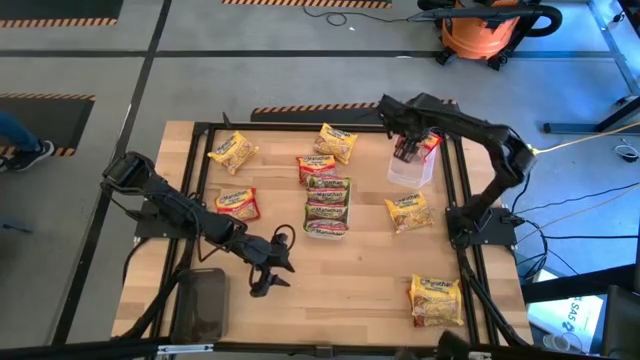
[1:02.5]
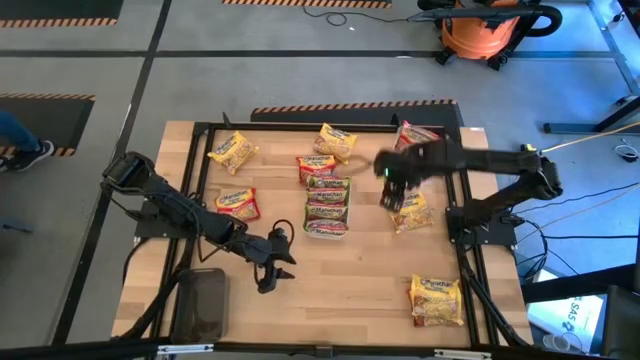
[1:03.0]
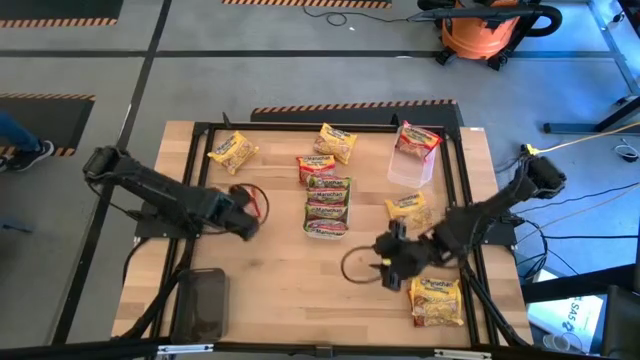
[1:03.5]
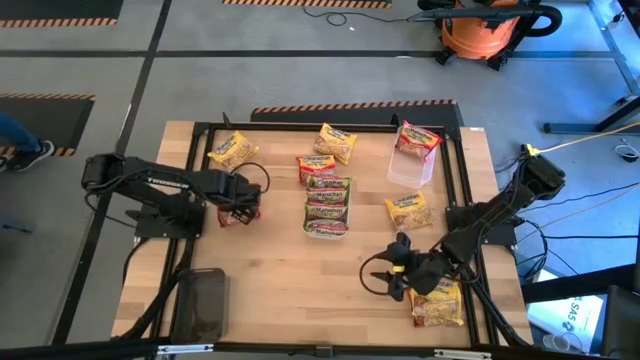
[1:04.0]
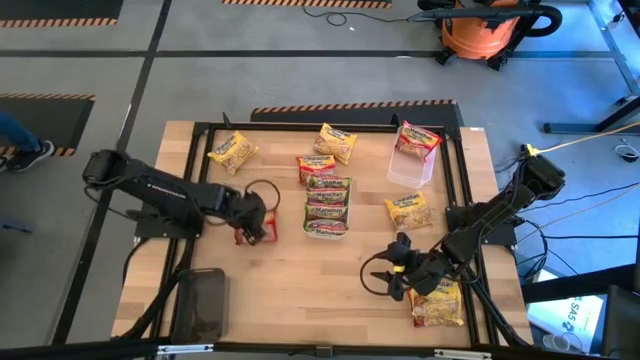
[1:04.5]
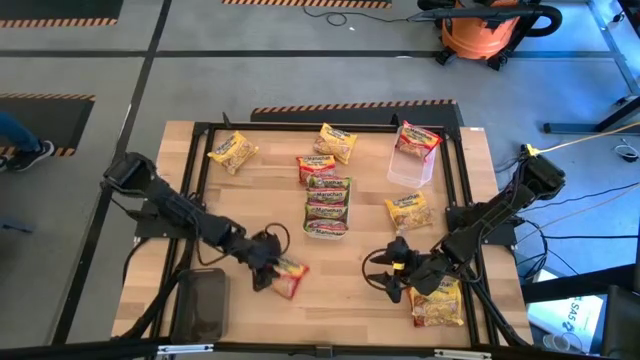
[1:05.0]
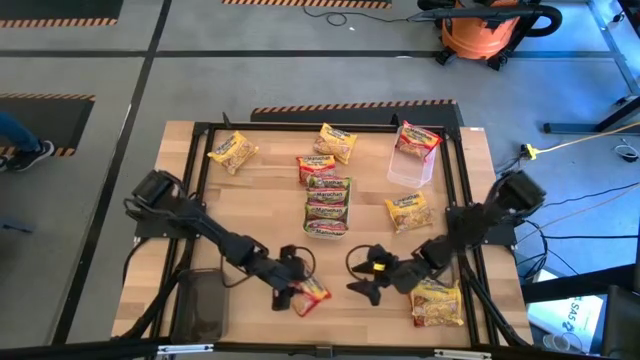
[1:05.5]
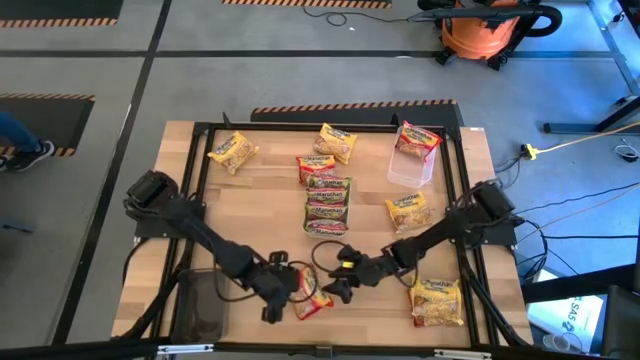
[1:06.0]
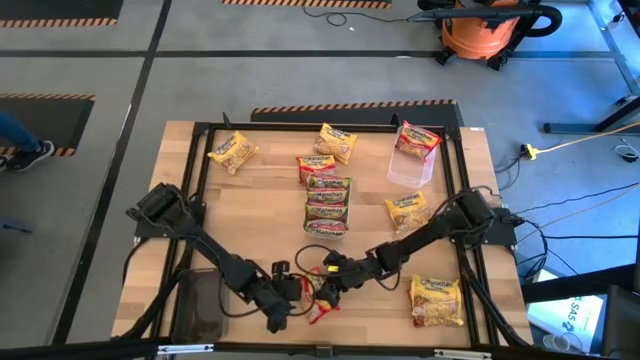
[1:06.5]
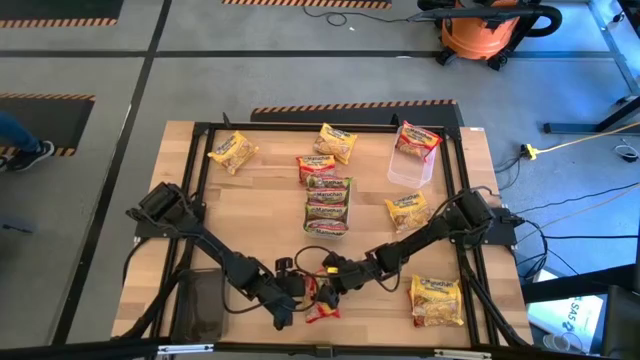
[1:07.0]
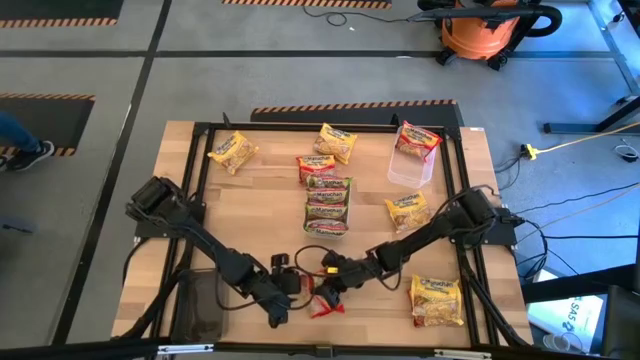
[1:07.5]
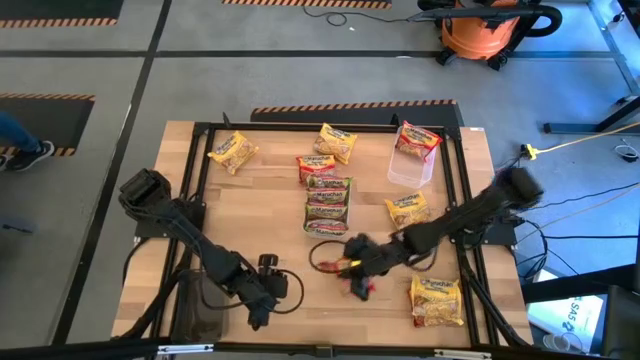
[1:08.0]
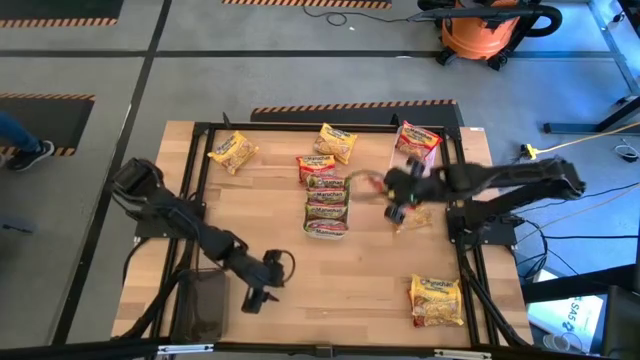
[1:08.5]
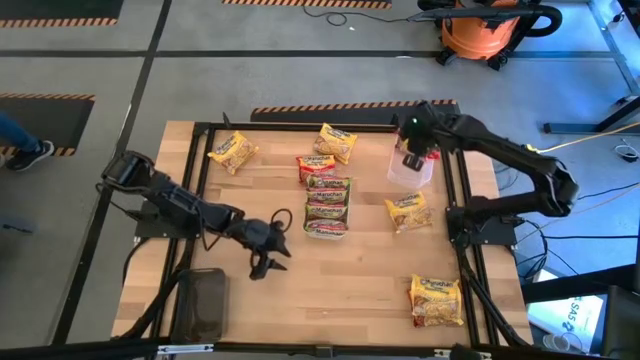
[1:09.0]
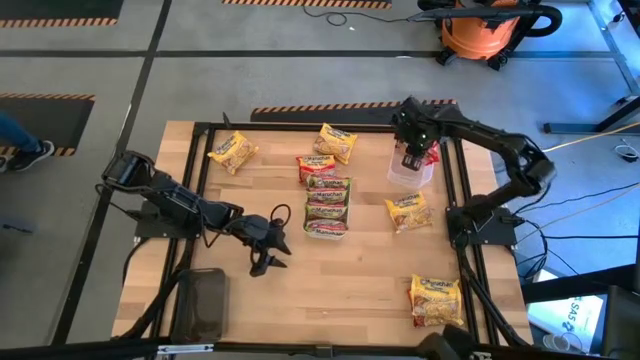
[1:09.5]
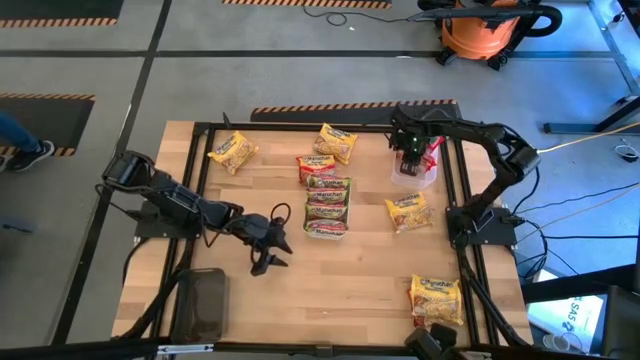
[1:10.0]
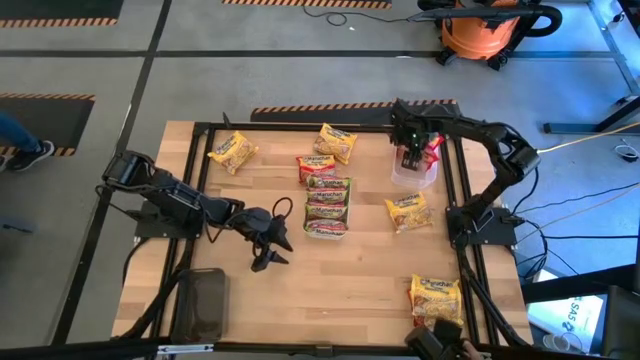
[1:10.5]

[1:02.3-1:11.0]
Task: Sort Maruchan noodles
Put the red noodle pack into the transparent bin

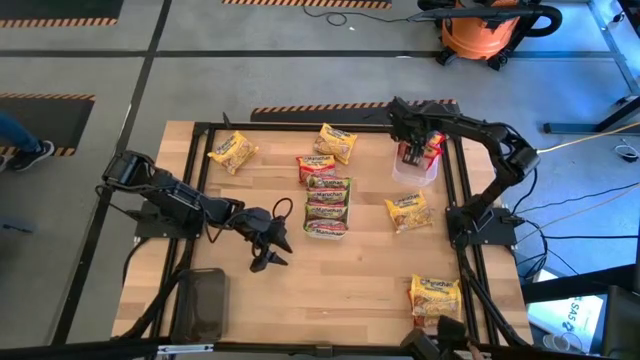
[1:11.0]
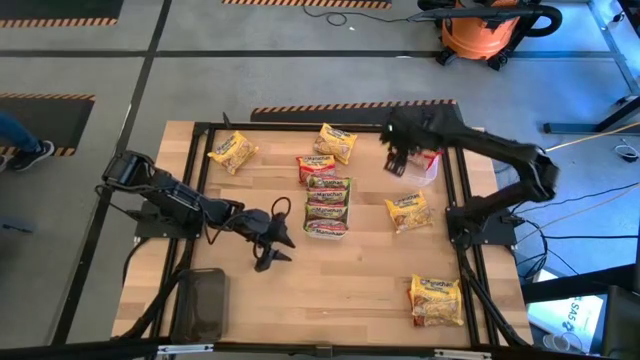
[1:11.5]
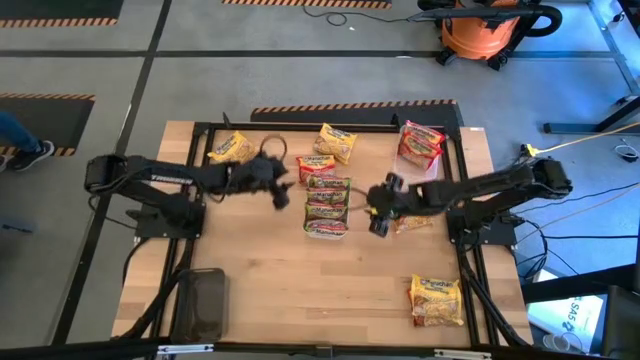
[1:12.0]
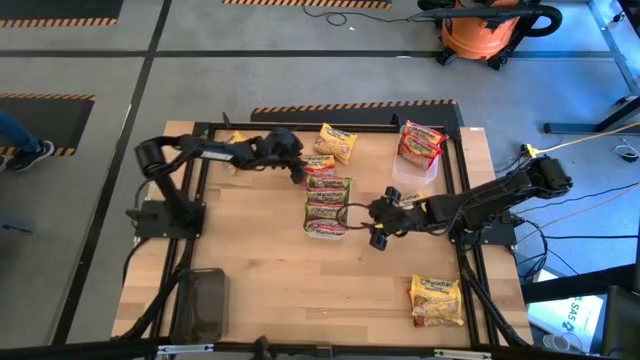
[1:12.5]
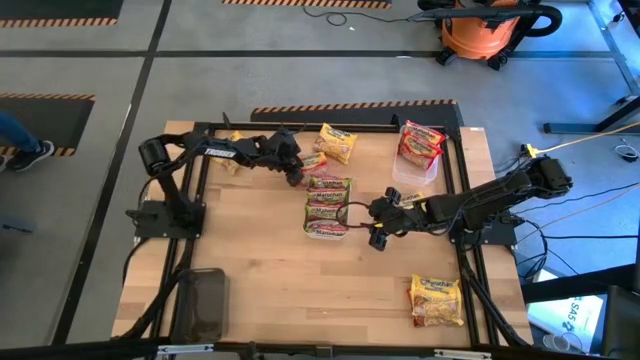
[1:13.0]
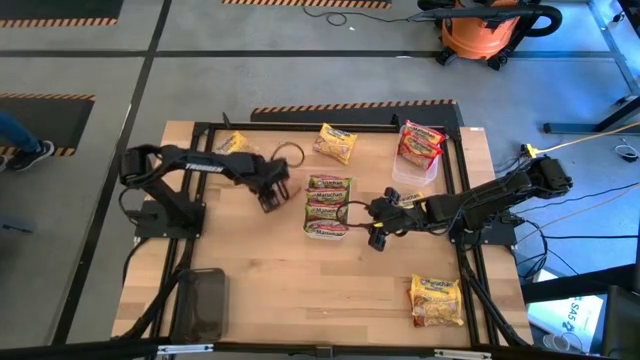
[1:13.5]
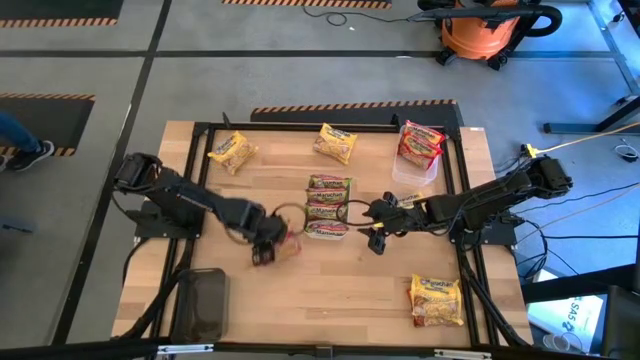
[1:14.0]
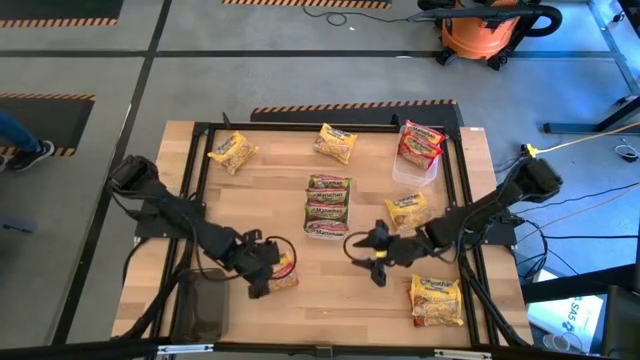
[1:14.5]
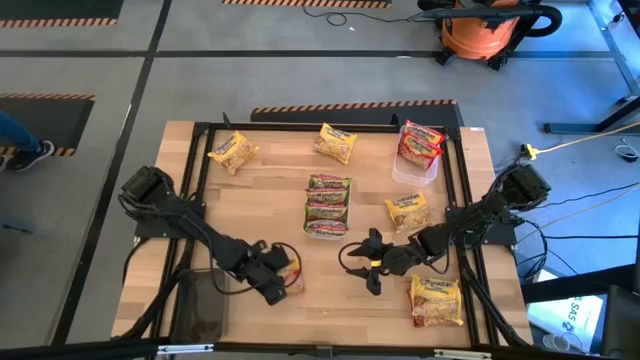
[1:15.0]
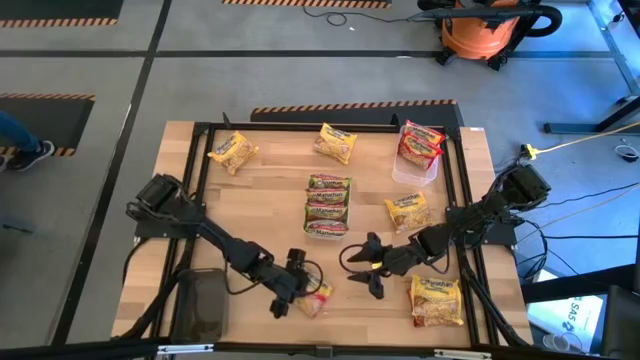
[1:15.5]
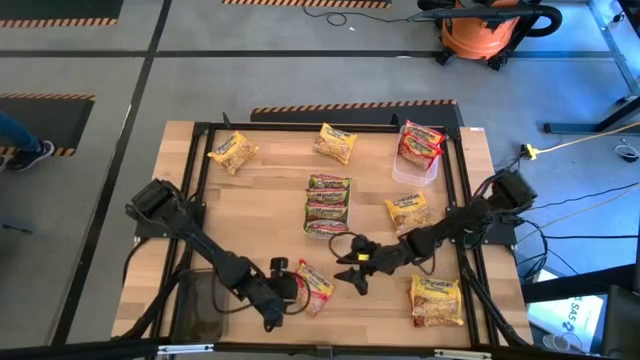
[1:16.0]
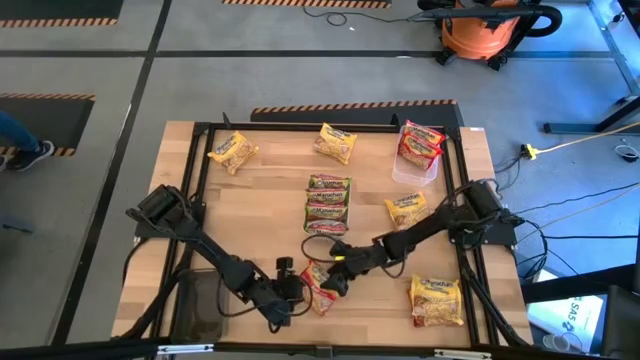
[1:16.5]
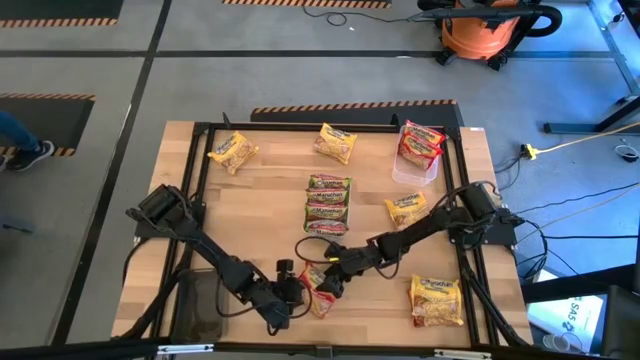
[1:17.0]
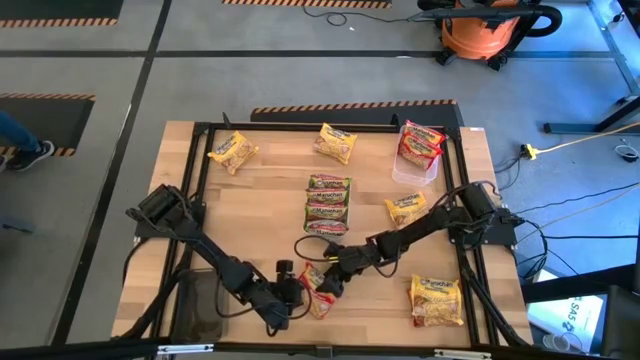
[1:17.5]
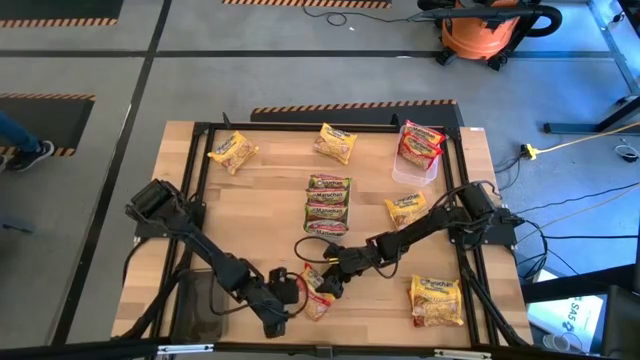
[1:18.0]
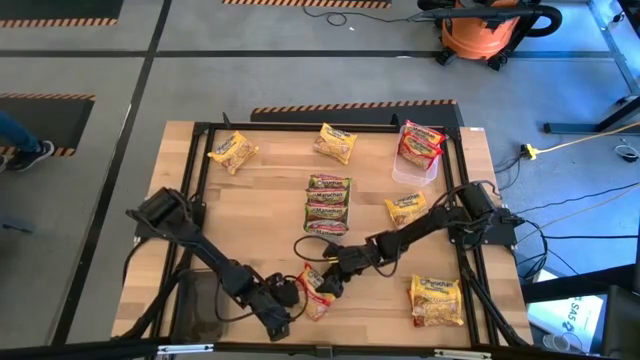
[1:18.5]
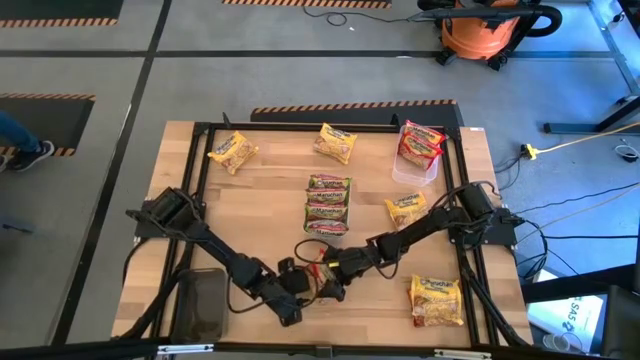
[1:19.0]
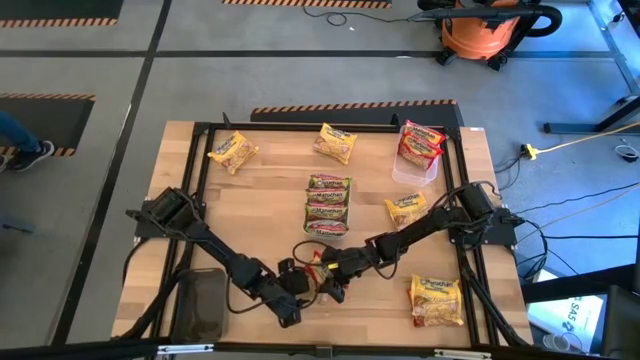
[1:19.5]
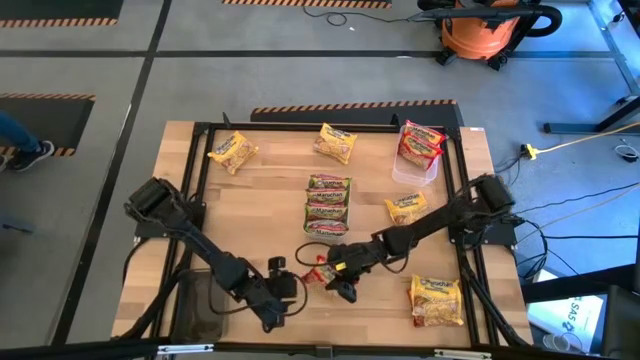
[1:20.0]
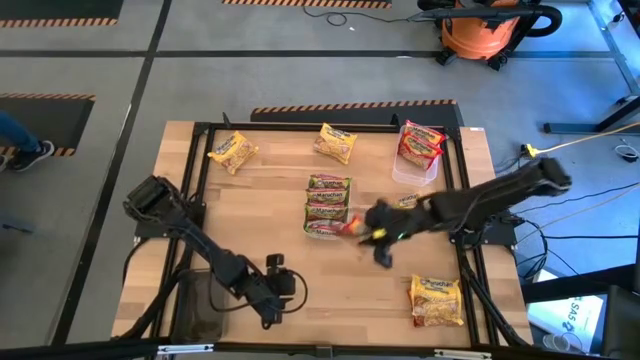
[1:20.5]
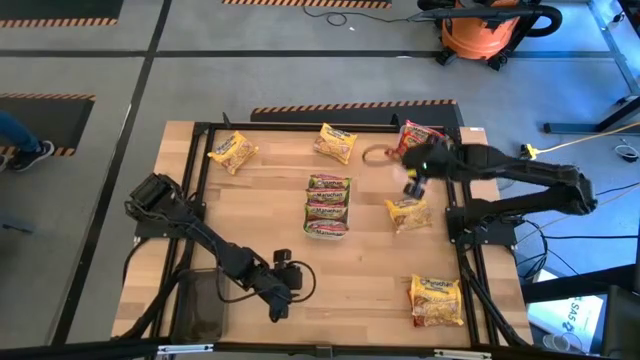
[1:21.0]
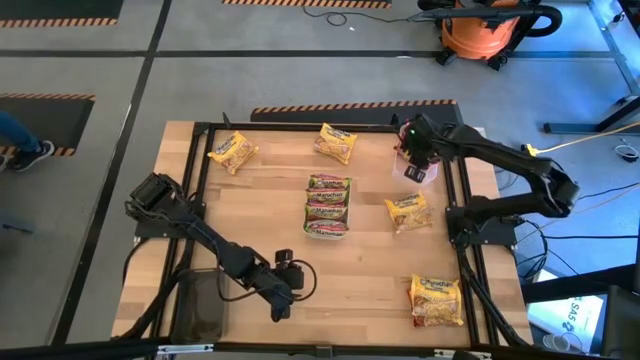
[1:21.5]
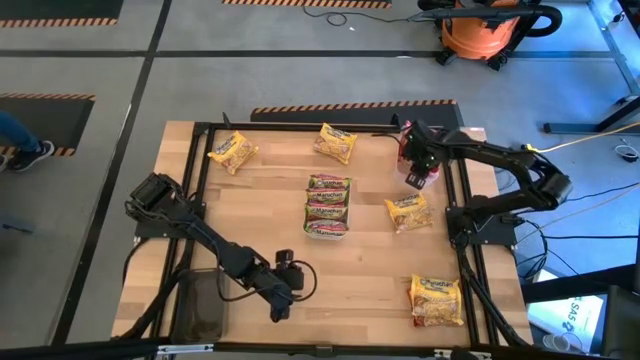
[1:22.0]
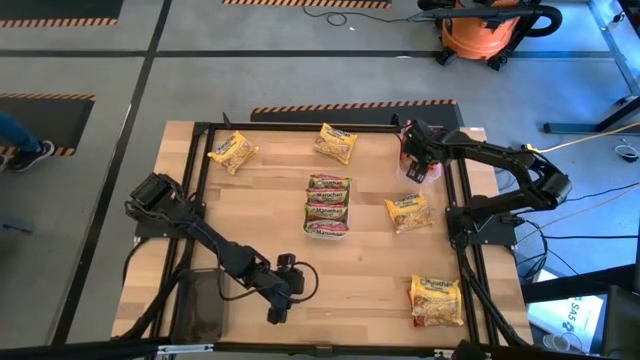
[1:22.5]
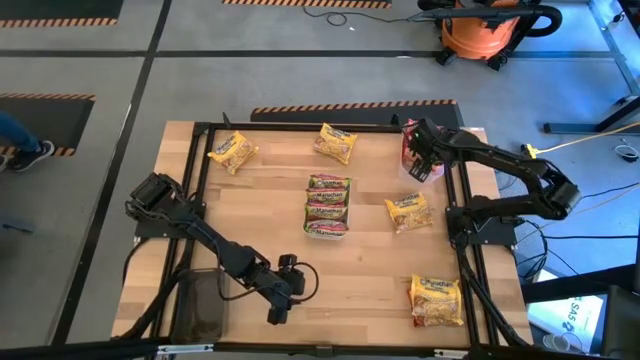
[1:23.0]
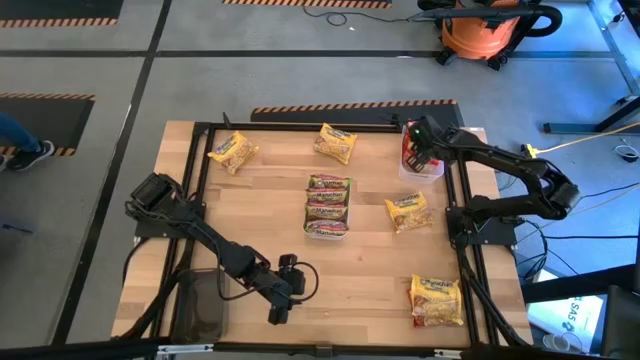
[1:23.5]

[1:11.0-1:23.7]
Put the red noodle pack into the transparent bin

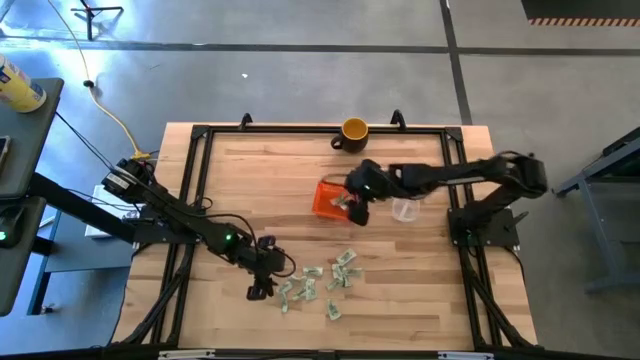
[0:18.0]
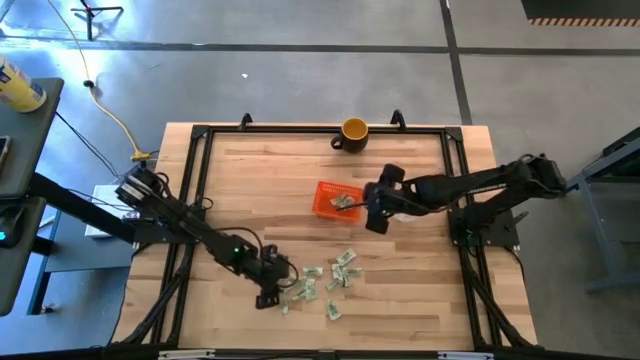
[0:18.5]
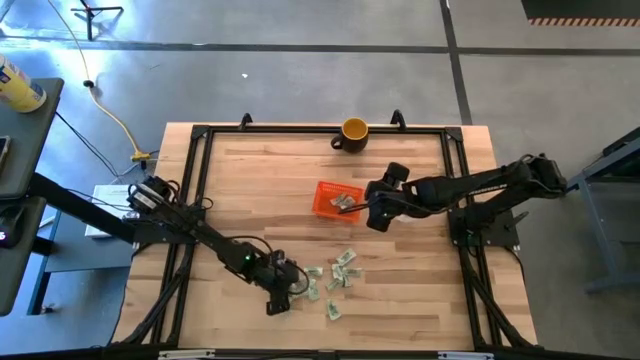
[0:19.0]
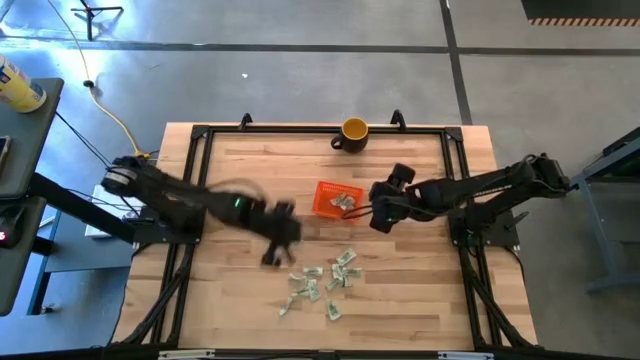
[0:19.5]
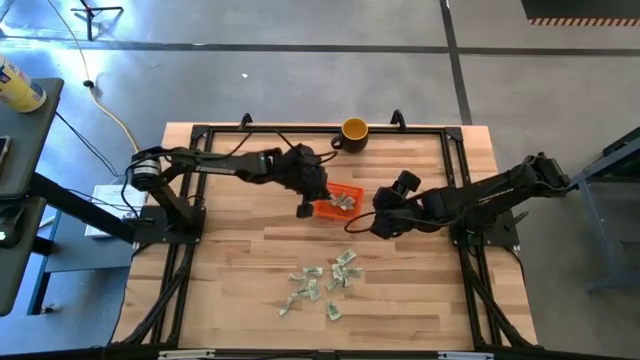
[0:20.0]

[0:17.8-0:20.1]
Task: Pick and place items into bin
Put the white stevia packet into the orange bin
